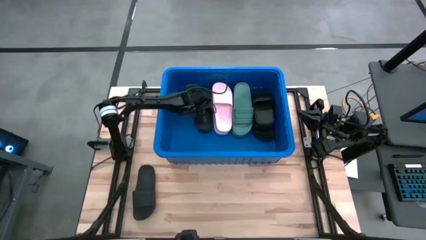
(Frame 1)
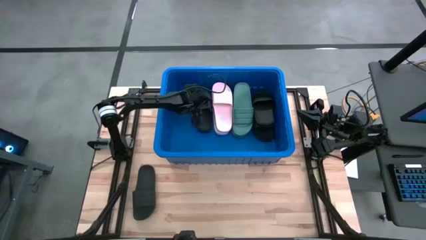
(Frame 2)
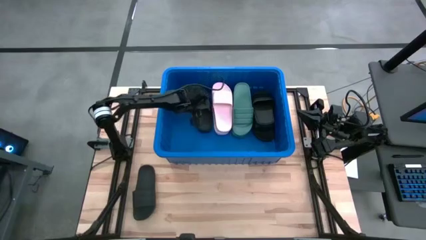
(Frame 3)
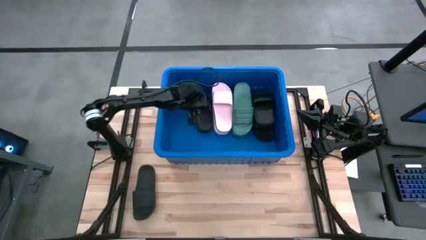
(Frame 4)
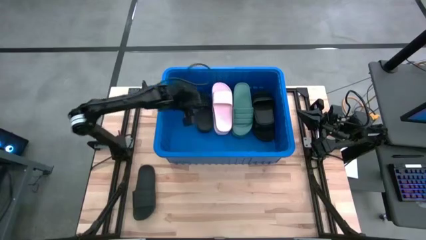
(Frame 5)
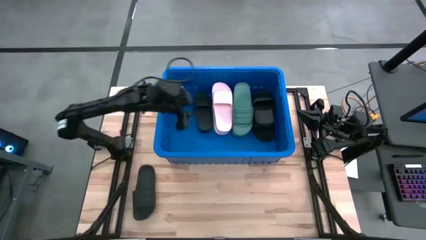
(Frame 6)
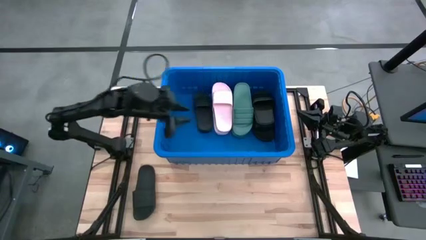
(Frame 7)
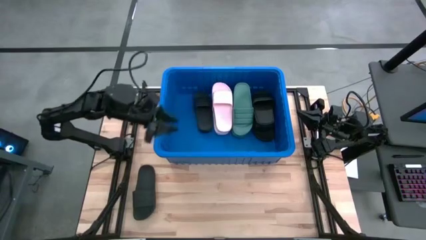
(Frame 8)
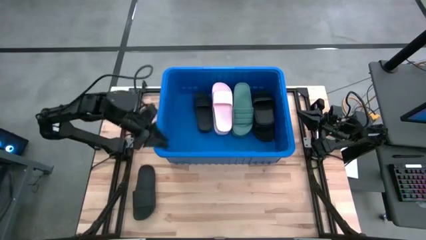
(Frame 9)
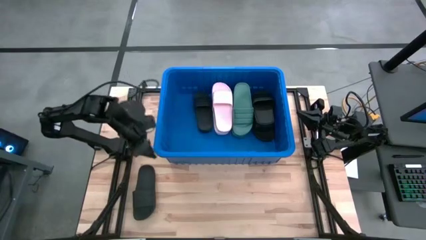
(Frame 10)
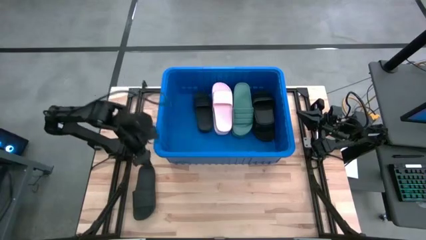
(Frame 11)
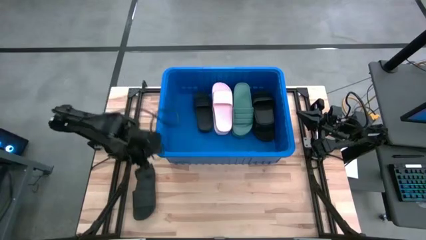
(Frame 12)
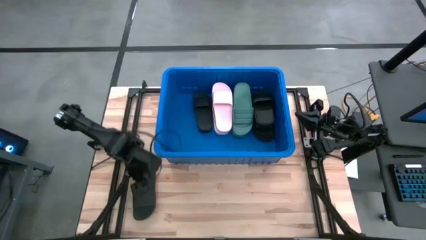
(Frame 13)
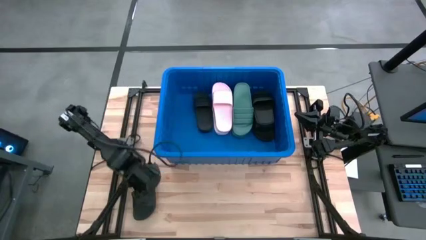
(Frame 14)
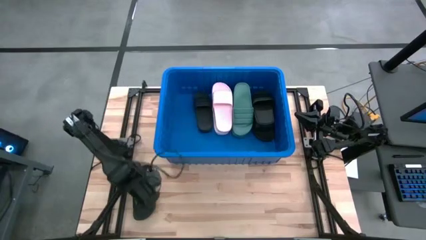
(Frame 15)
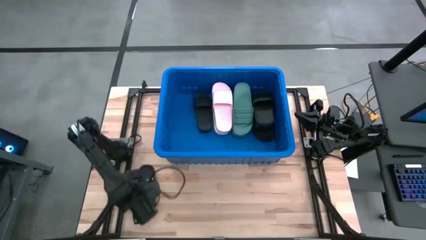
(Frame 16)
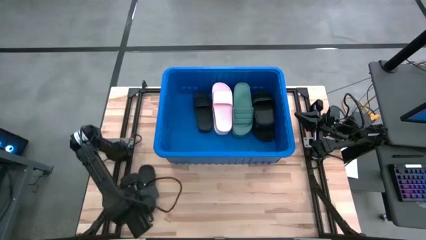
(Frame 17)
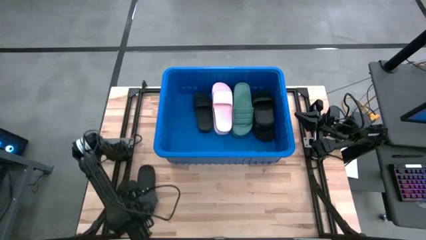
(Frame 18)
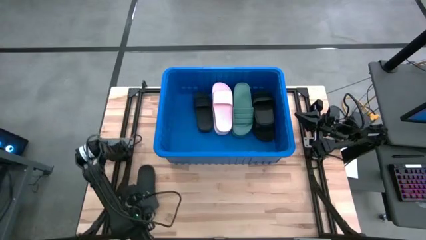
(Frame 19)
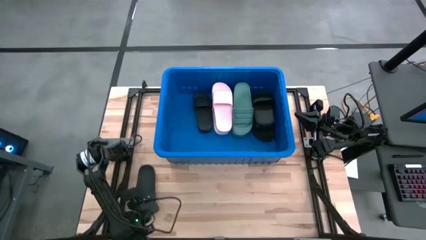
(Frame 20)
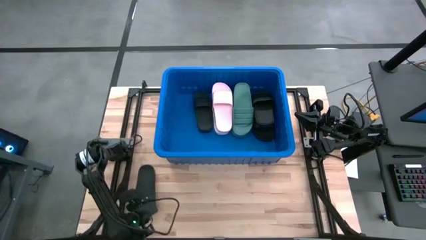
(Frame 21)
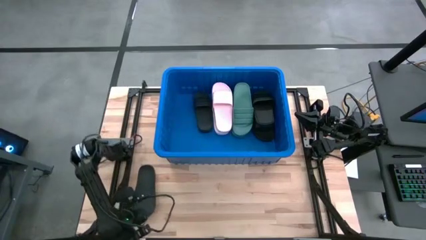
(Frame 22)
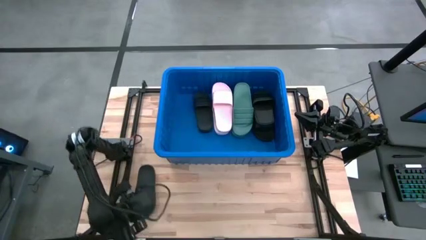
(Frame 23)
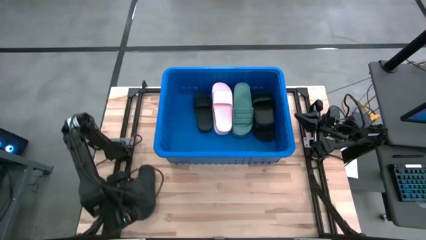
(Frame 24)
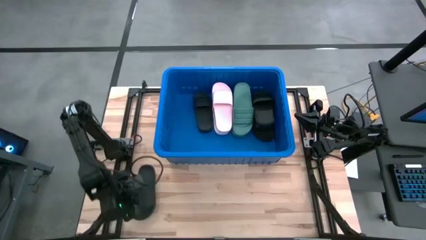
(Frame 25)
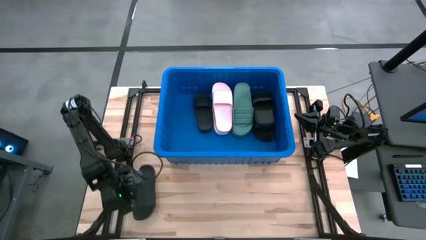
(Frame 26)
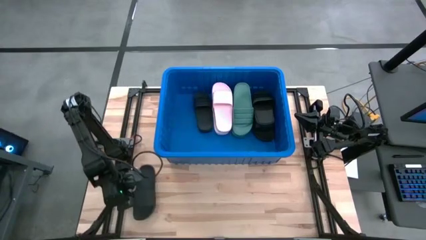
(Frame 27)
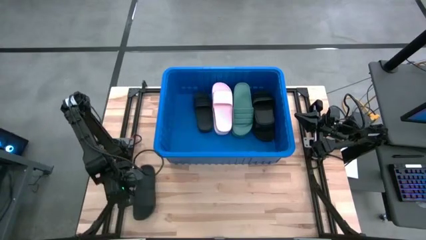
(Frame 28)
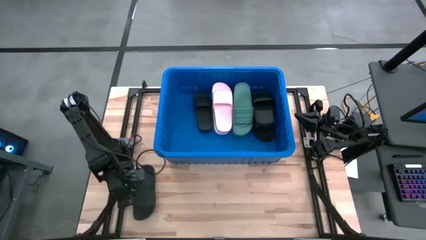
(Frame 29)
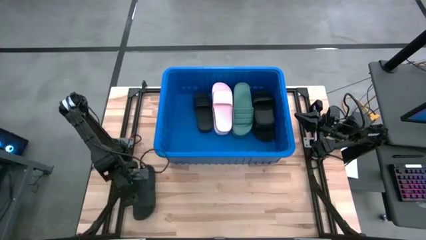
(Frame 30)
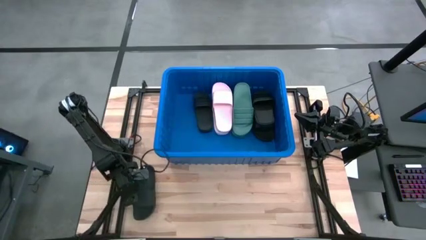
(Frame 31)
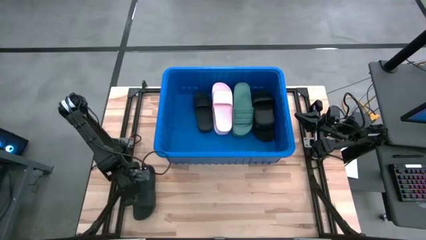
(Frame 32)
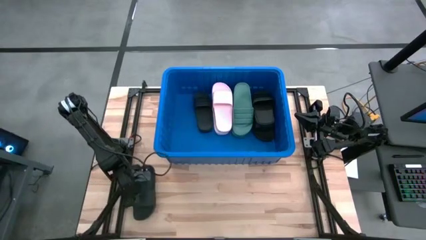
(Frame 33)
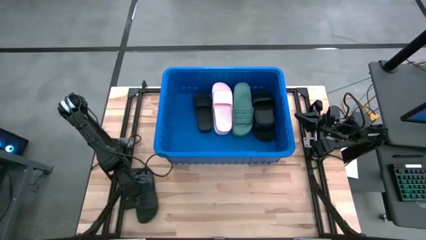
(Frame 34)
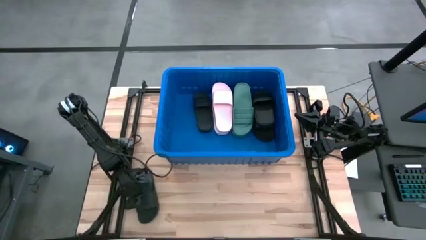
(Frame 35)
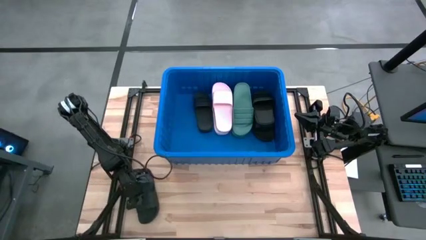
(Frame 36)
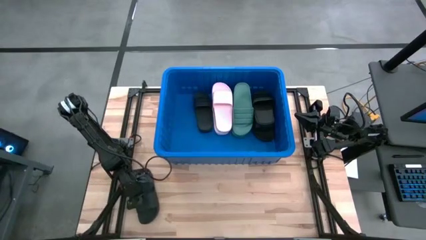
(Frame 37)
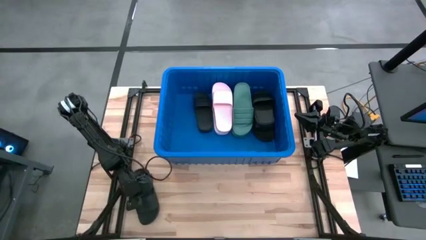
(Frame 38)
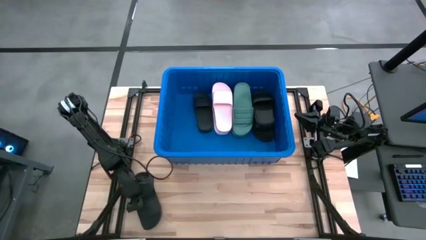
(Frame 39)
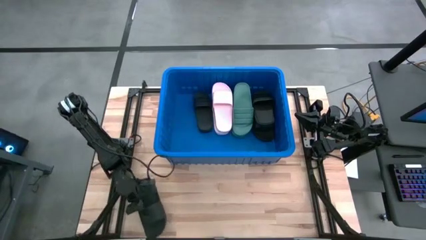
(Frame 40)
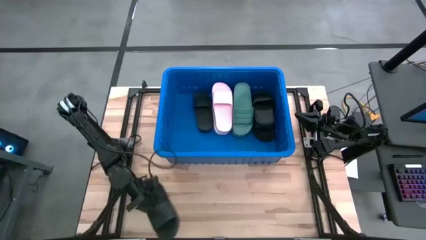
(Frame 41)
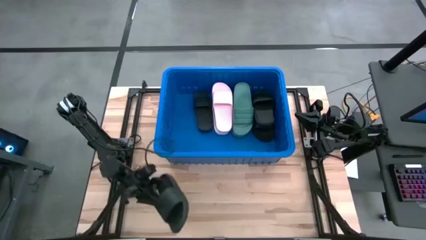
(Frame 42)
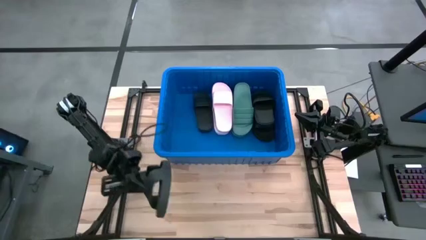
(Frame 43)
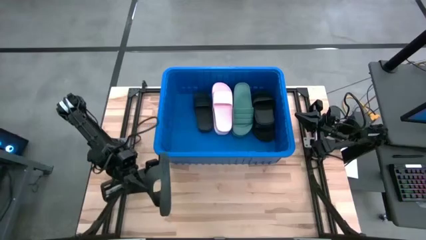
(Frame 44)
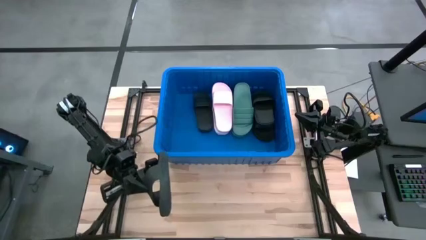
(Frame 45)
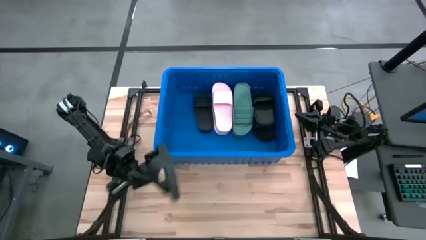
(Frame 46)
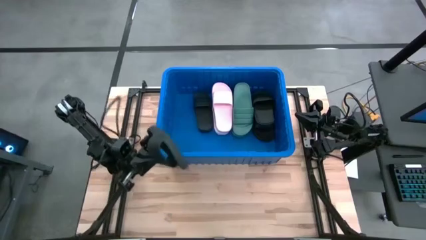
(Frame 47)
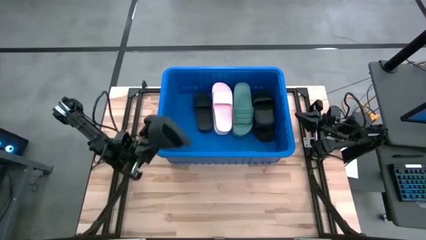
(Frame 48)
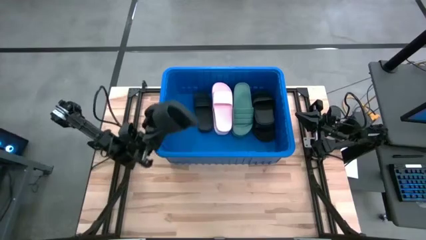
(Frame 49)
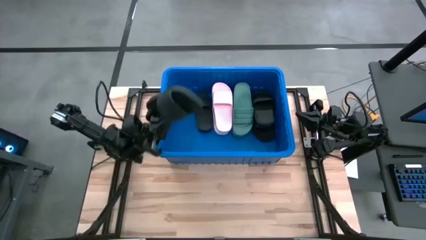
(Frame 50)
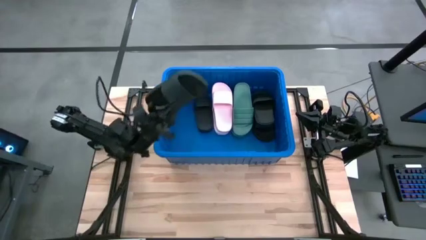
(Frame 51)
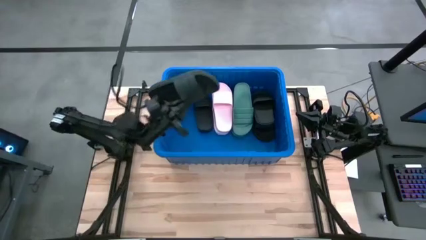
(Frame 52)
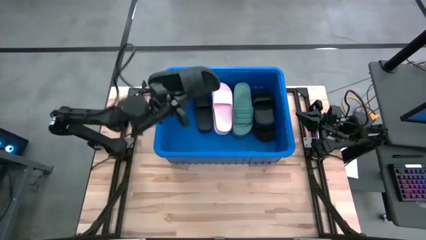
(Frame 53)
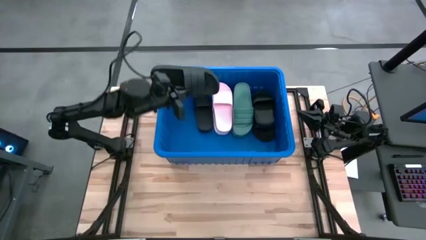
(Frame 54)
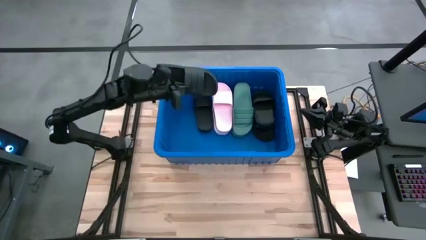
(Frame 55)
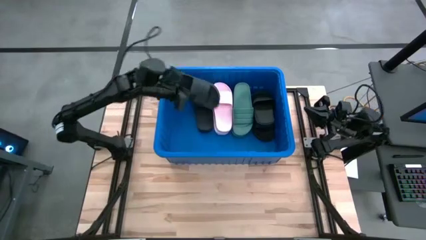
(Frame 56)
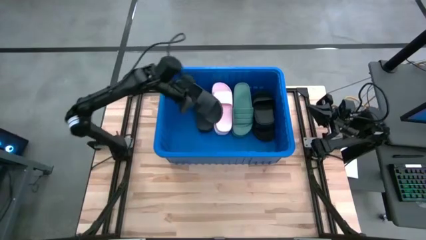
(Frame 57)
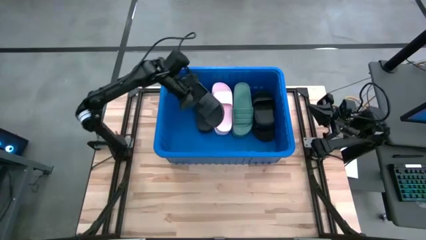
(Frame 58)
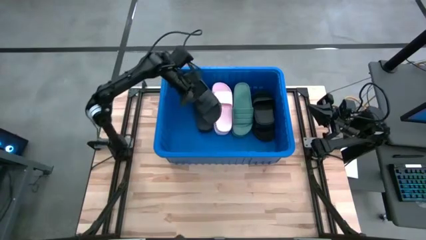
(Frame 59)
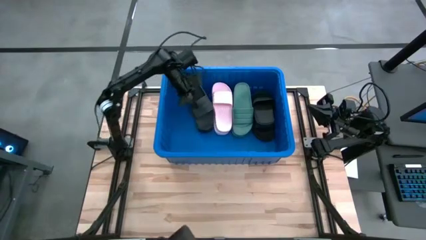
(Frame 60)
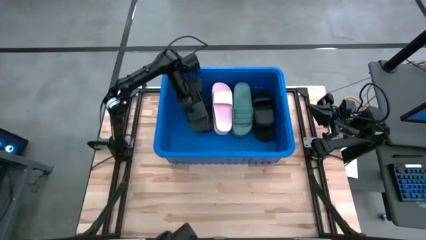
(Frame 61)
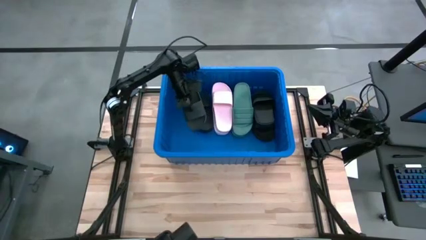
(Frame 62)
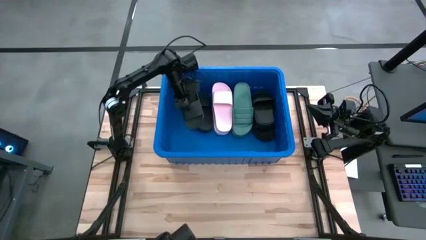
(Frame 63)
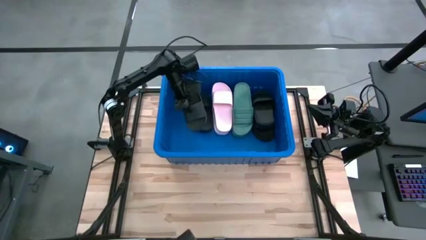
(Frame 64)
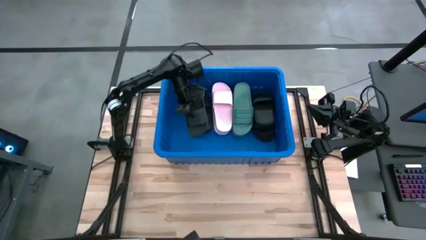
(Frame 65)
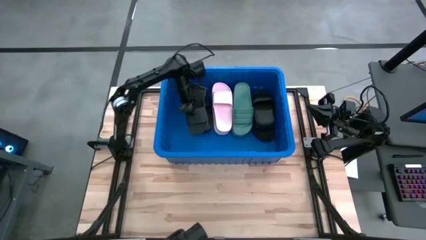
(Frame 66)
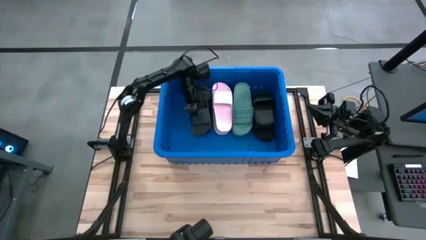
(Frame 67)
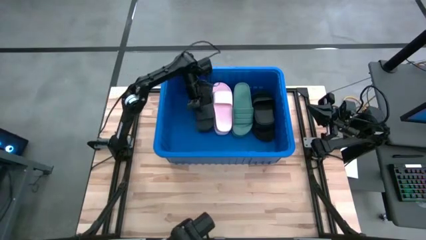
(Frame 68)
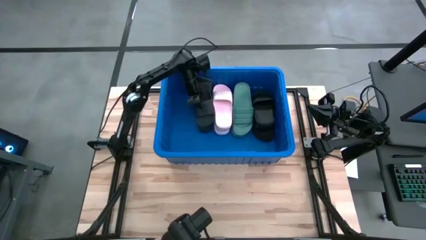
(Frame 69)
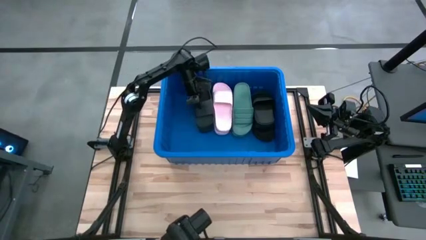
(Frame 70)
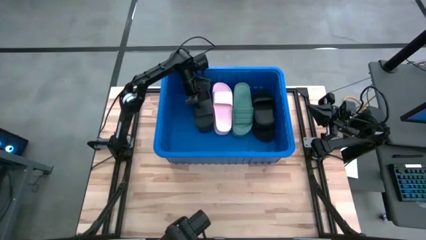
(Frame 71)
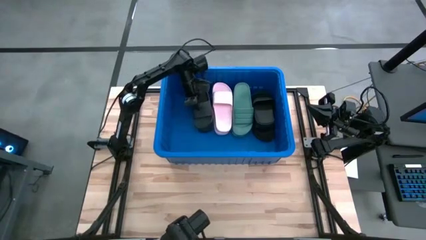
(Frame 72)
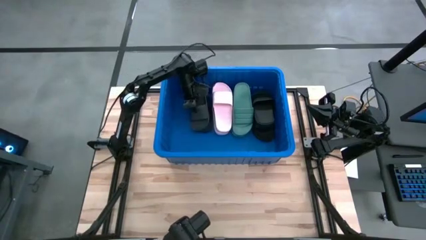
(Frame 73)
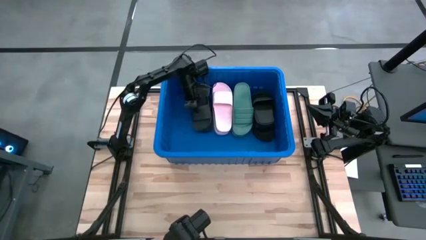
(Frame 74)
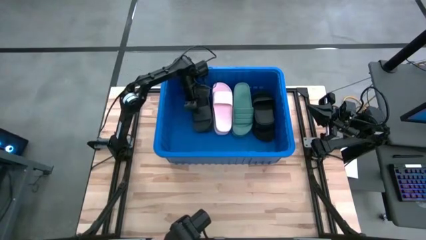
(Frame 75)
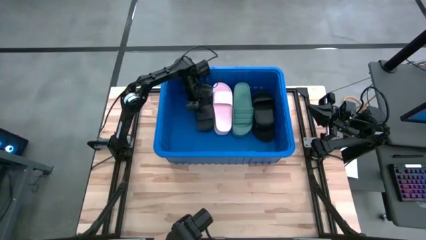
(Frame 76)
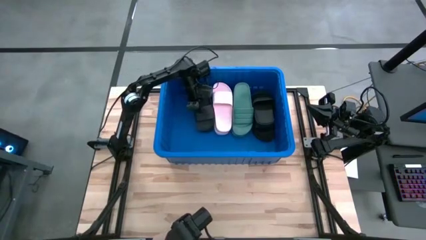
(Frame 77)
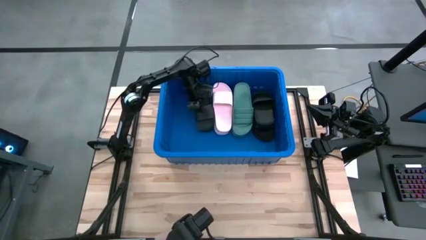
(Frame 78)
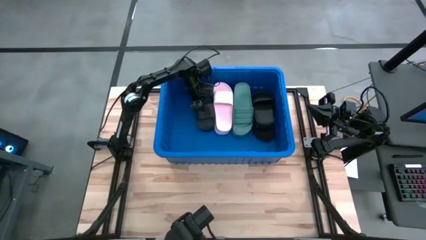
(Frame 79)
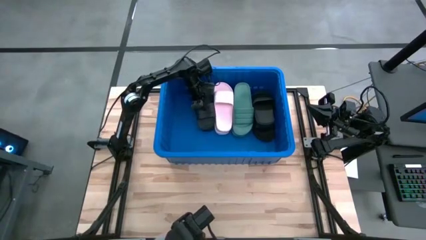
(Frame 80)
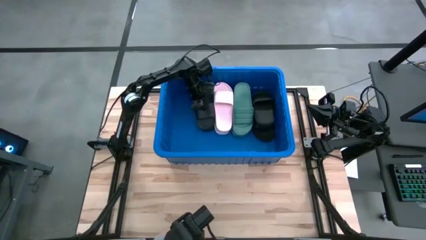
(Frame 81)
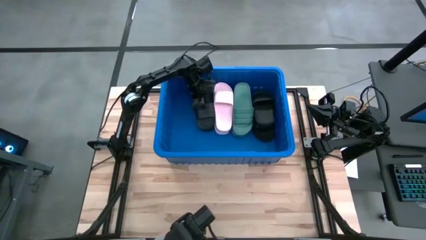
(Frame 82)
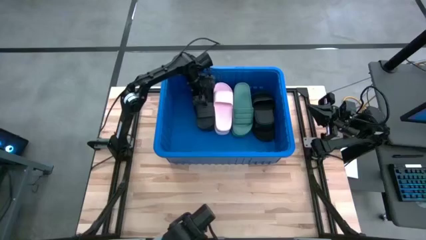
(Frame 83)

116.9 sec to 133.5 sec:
Task: Pick and place slides into bin
Put the black slide into the bin
